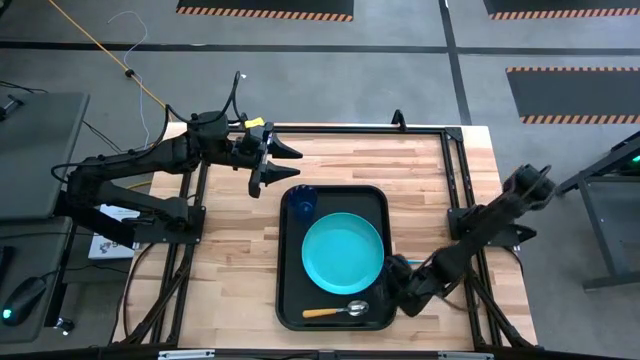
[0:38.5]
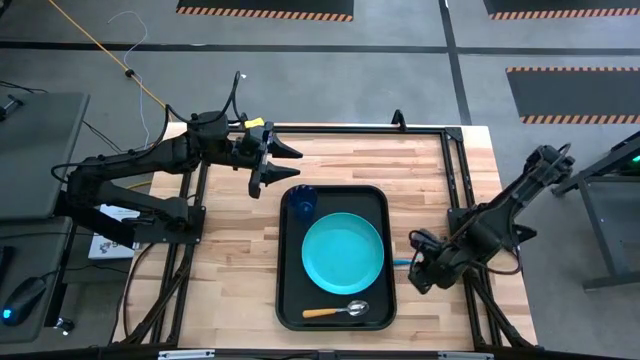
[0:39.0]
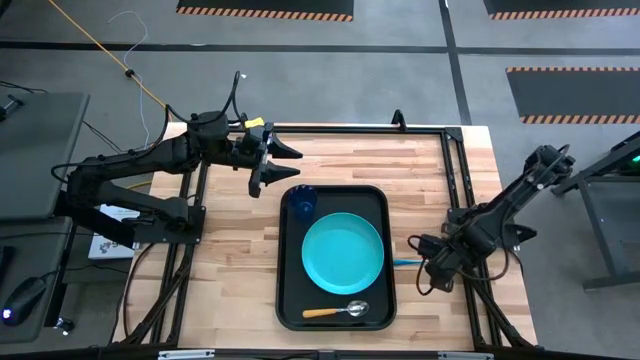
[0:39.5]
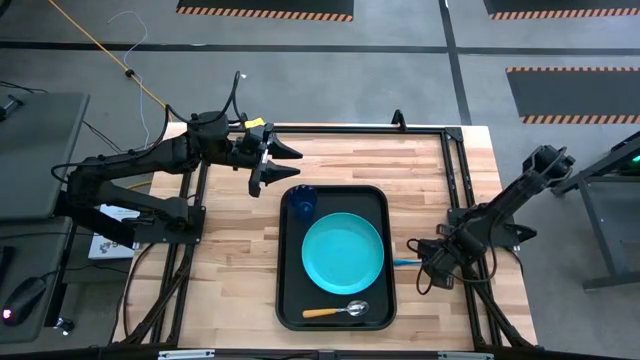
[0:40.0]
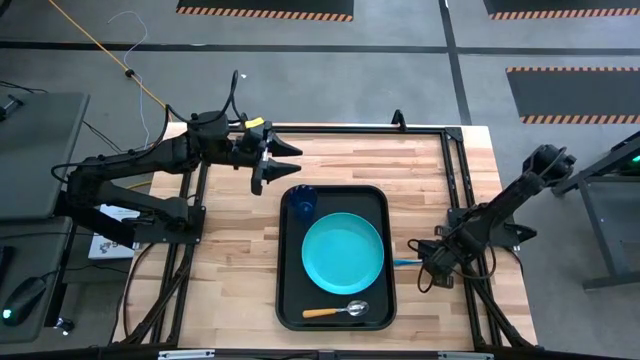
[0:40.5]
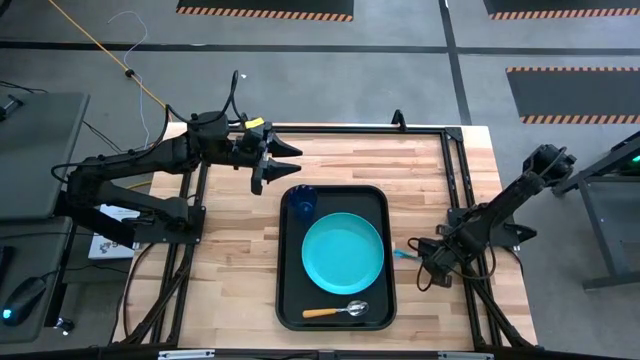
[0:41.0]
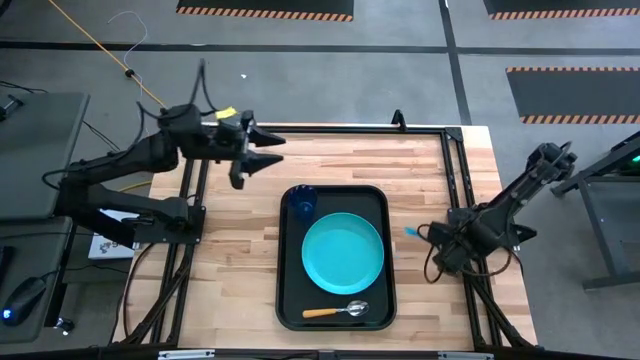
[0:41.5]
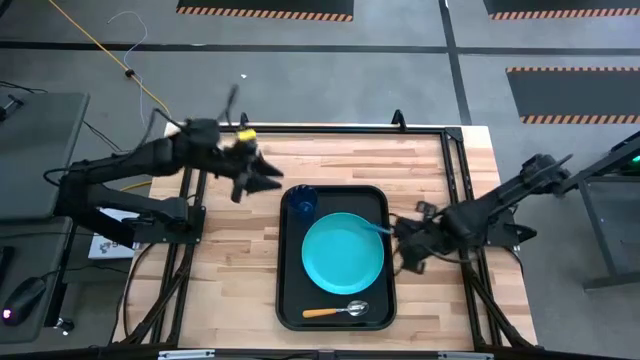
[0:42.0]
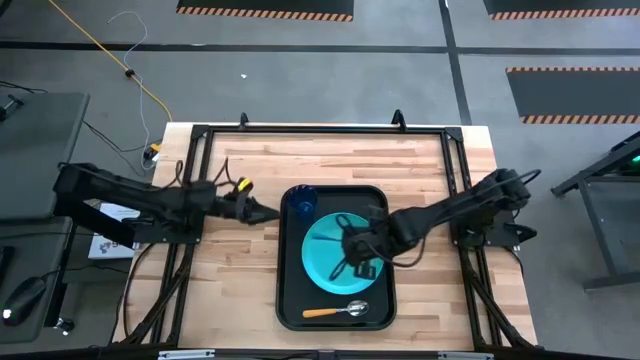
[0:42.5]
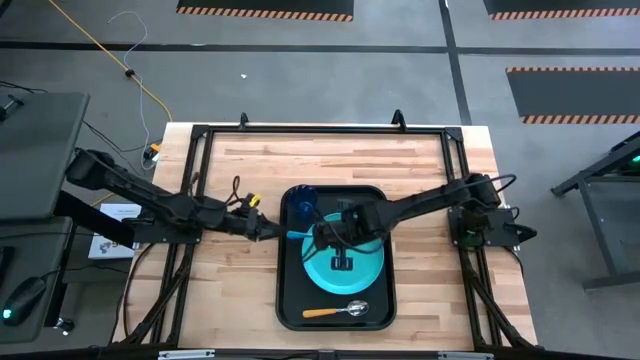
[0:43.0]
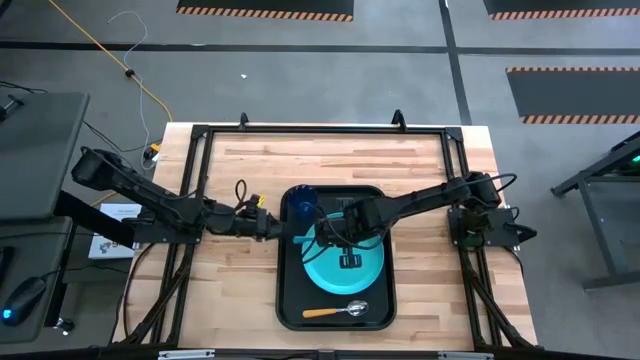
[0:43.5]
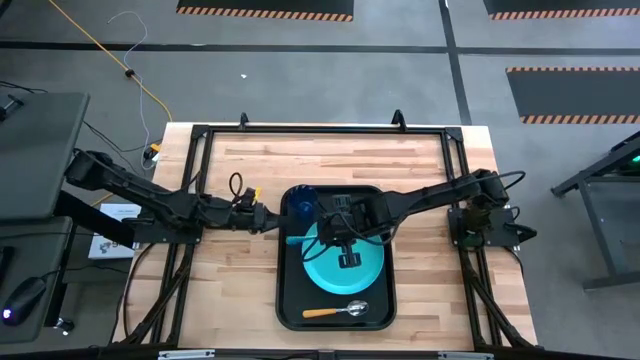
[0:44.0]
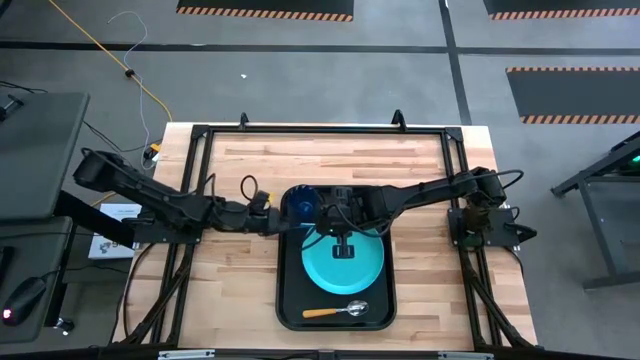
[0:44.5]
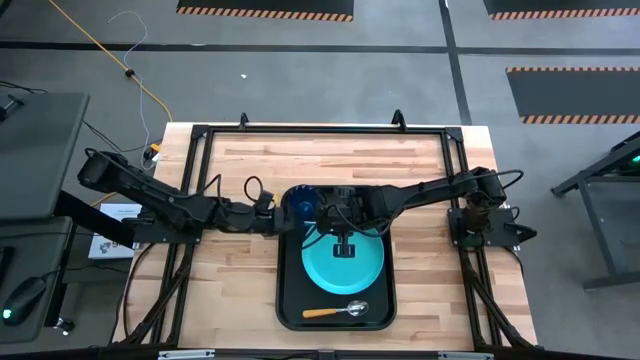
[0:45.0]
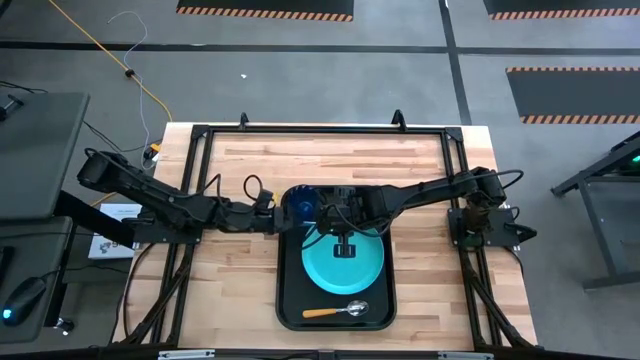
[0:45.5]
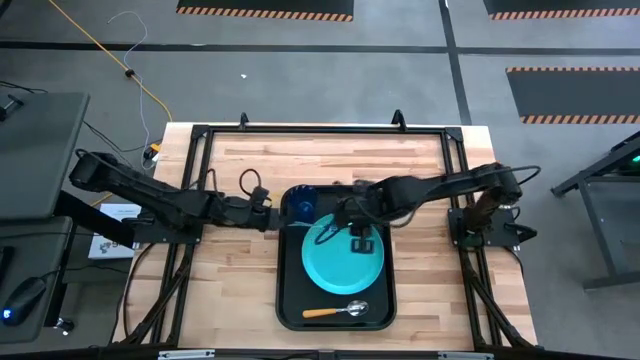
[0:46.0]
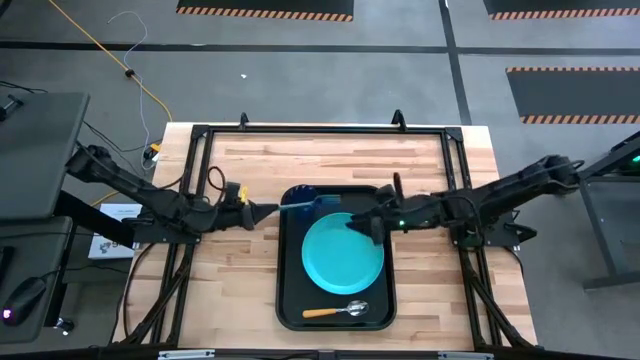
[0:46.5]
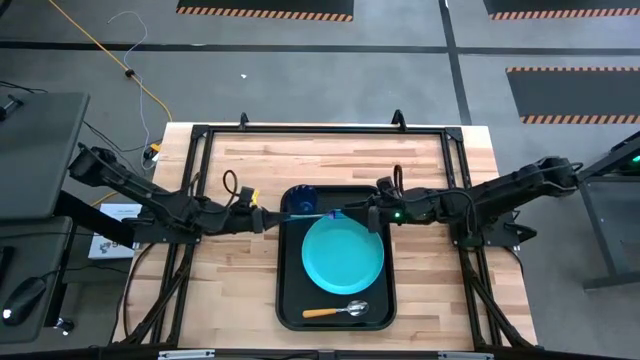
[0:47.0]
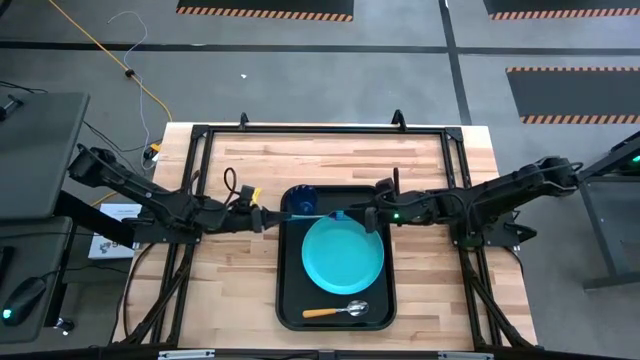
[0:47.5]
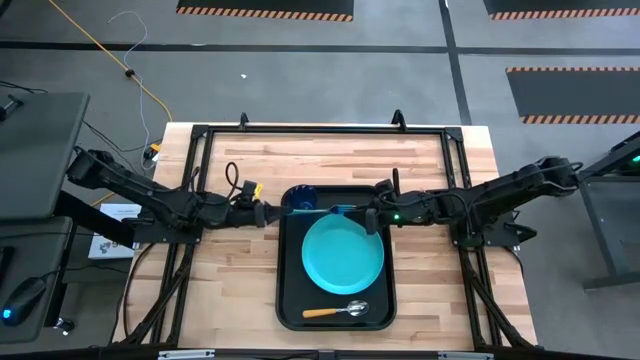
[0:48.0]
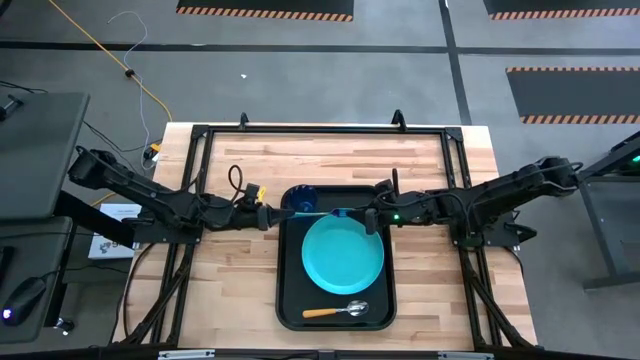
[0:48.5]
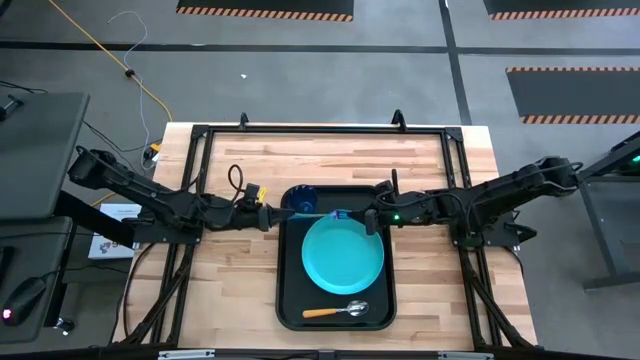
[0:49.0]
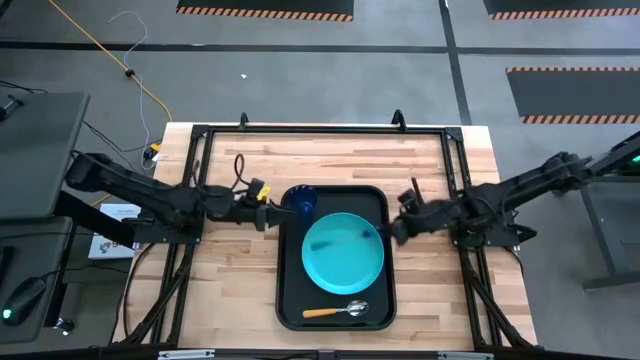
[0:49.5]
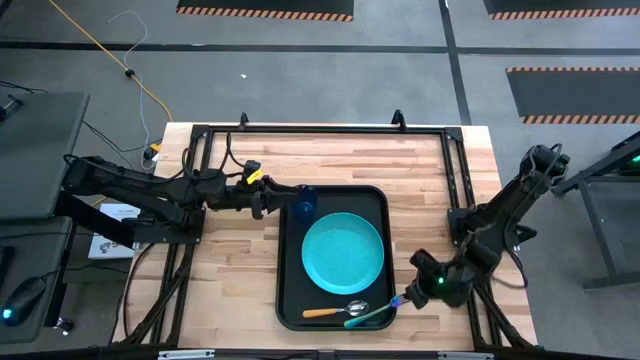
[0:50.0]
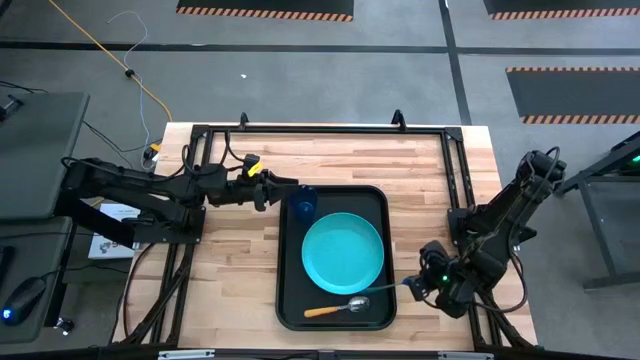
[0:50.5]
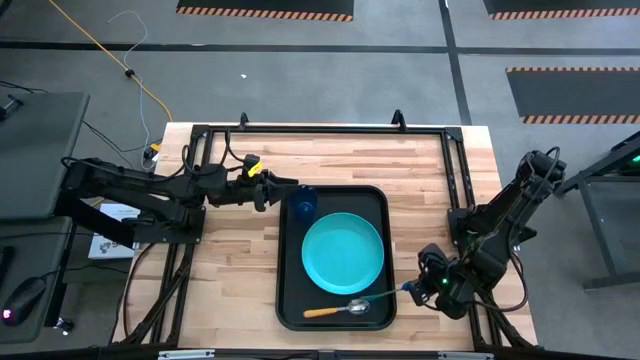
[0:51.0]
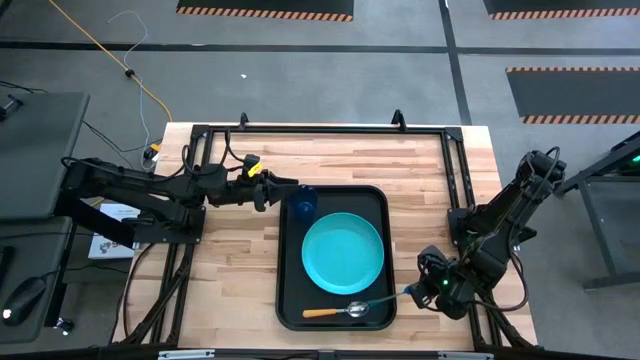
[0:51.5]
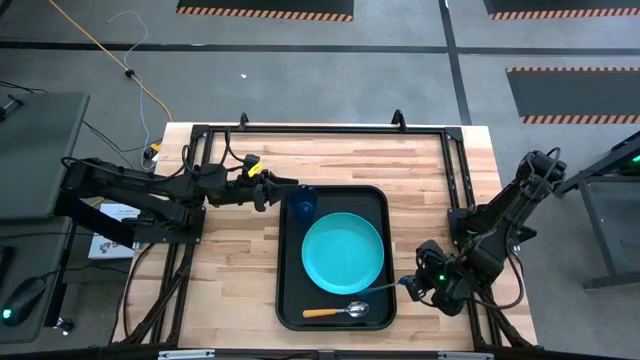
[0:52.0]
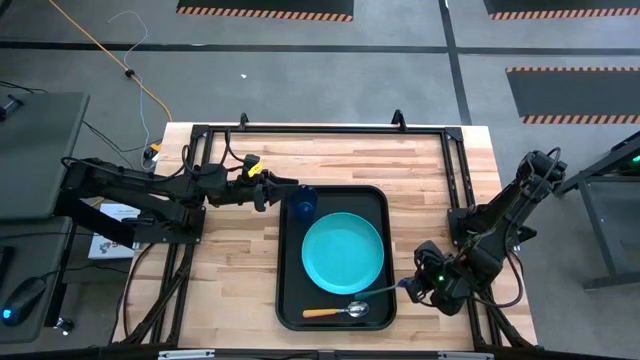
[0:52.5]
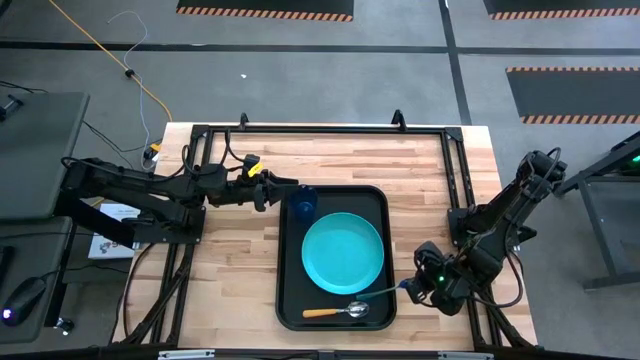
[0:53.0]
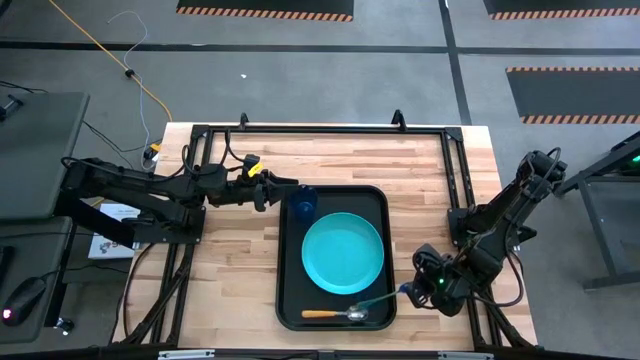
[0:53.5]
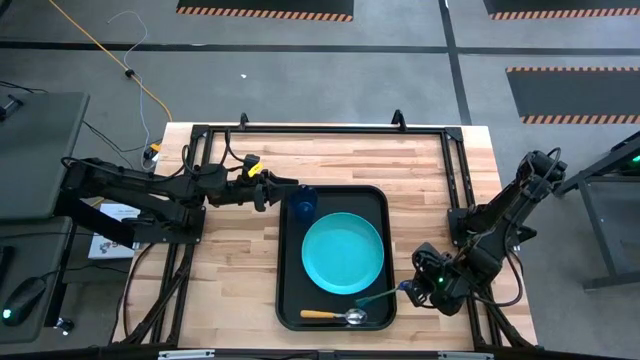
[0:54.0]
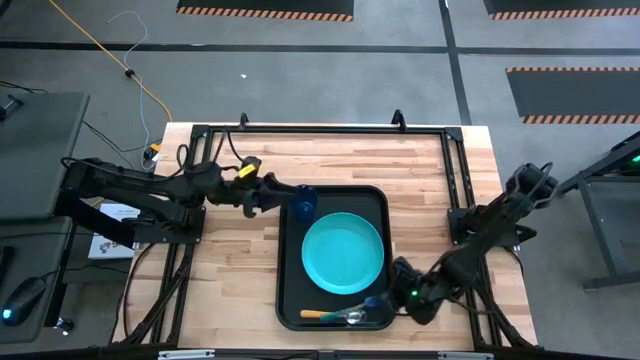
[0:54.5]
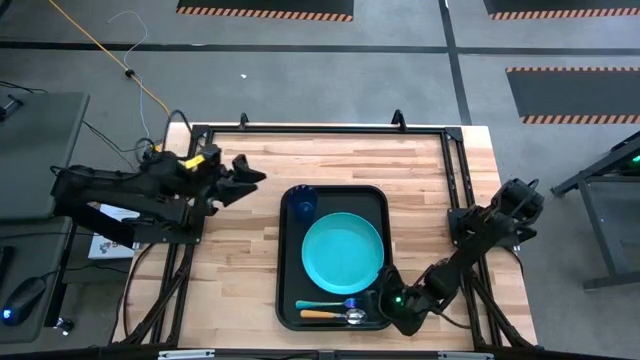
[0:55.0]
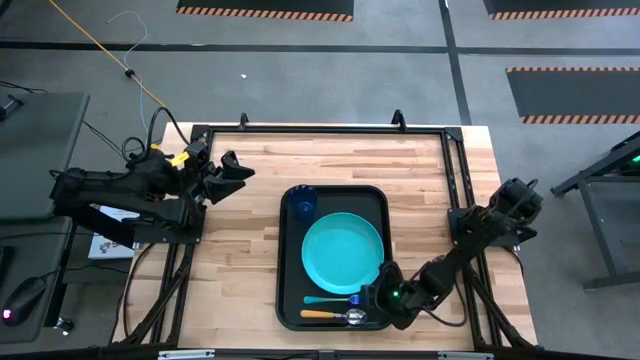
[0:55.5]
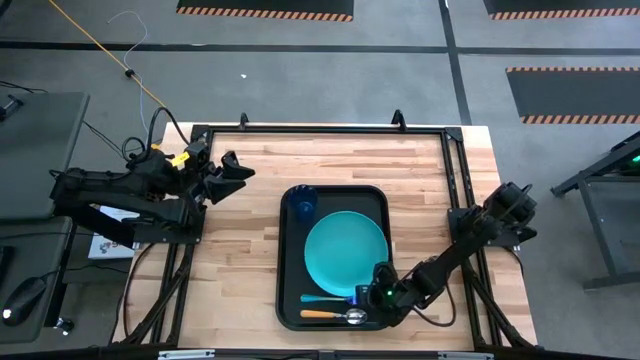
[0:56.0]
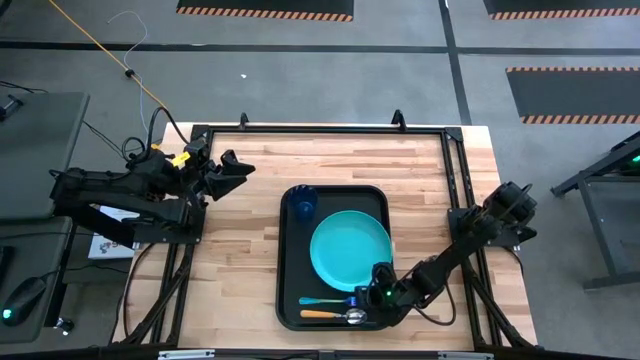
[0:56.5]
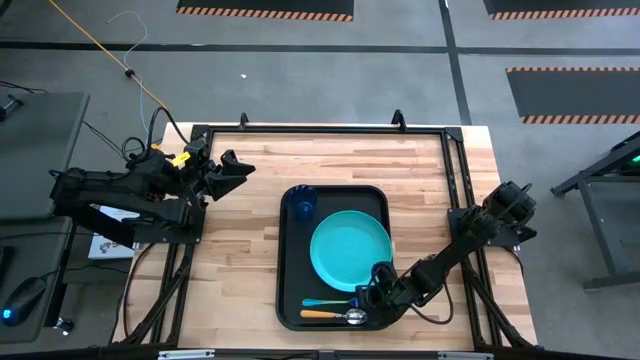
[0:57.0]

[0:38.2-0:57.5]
Task: Pick and place plate/cup/fork/spoon on tray
Put the purple fork in the black tray beside the spoon

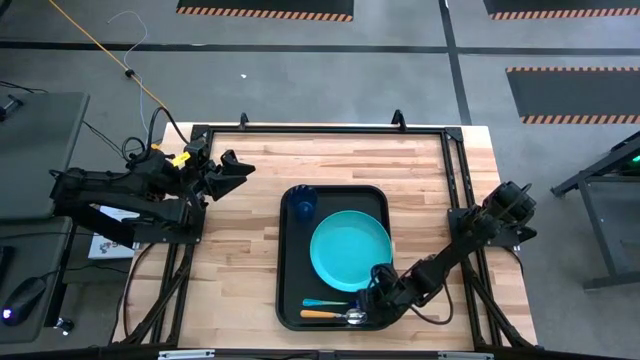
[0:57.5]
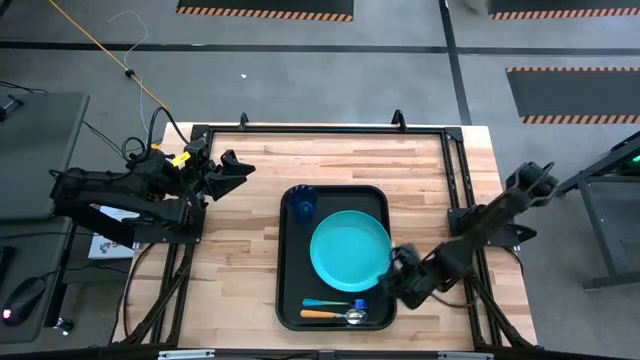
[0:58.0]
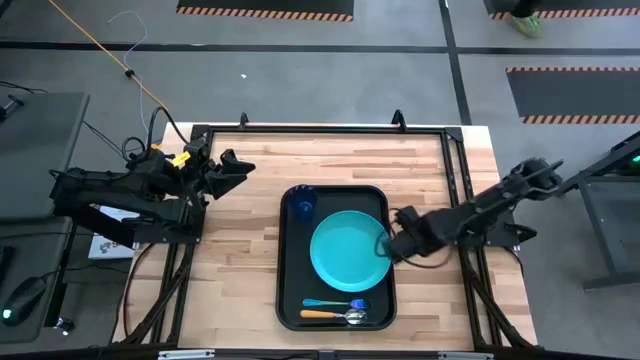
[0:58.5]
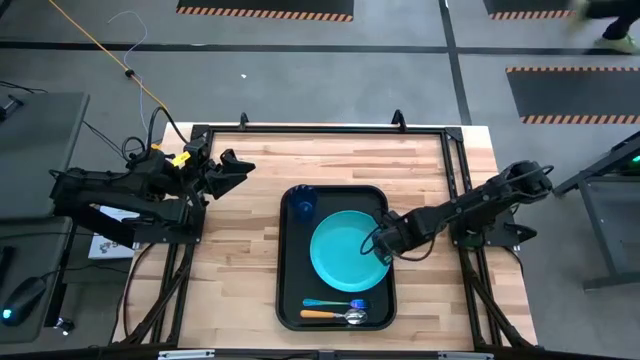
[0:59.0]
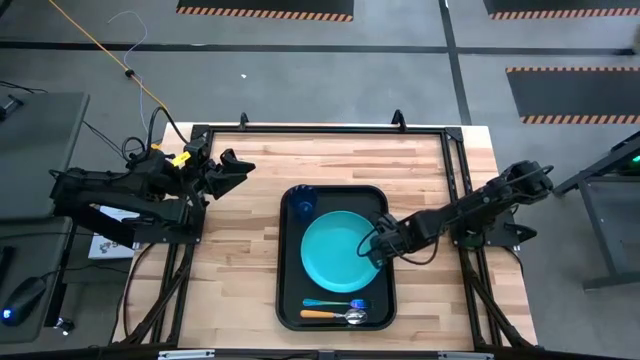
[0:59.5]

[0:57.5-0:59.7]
Adjust the blue plate on the black tray
